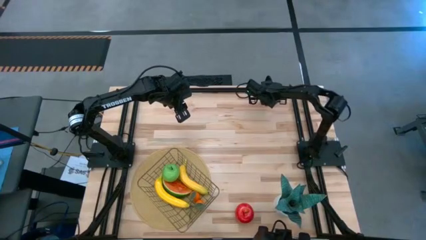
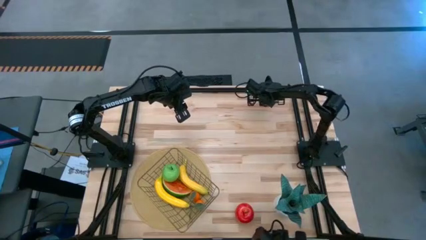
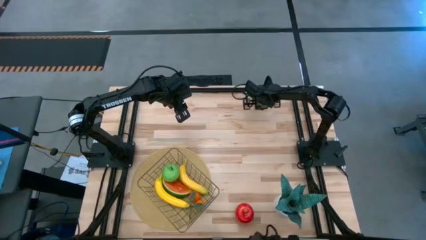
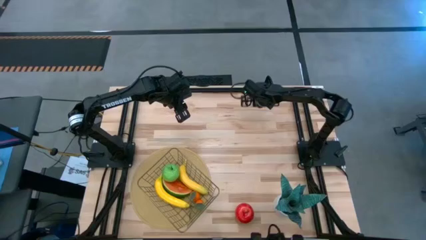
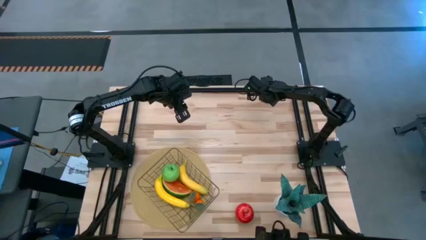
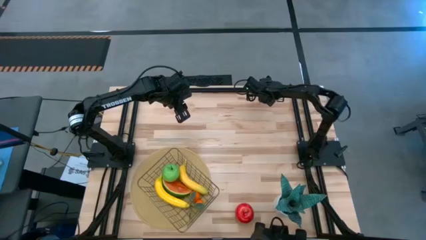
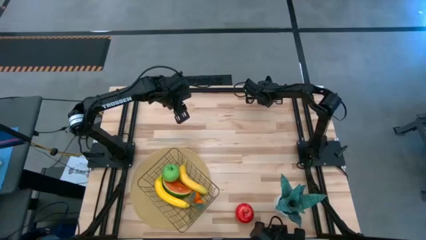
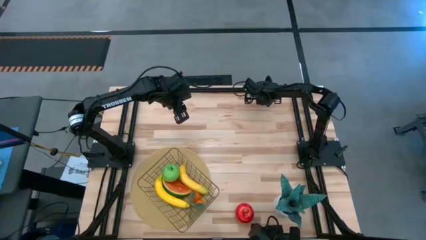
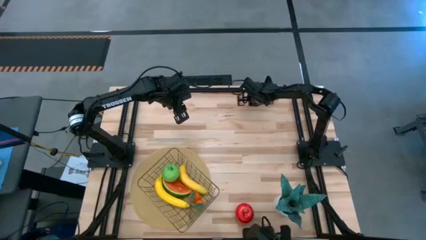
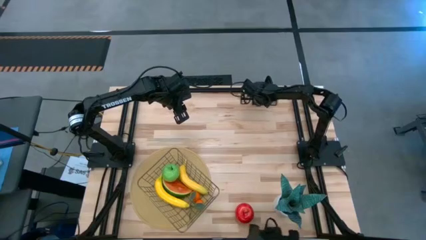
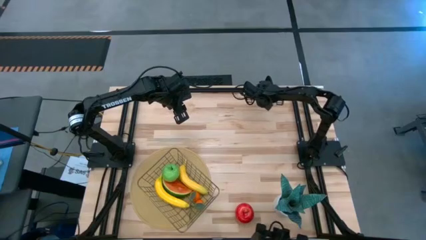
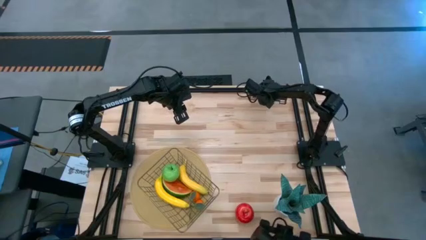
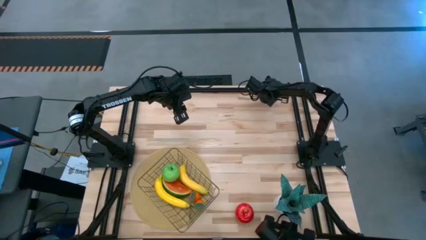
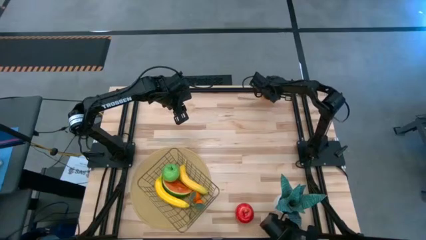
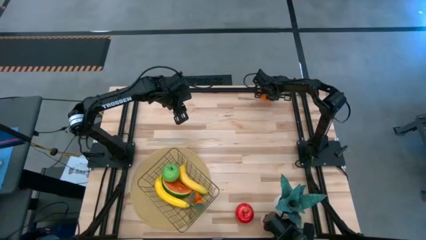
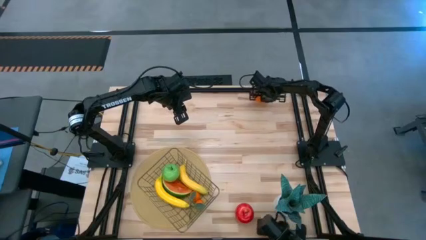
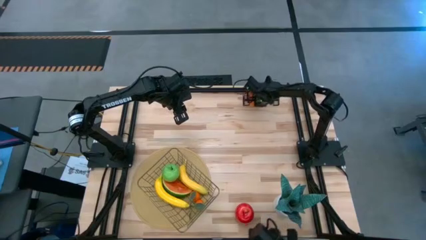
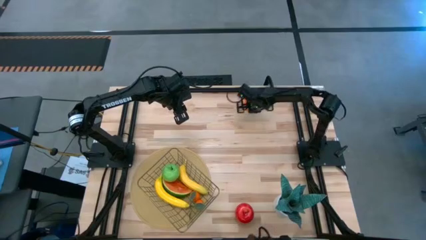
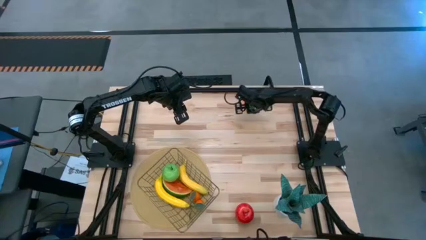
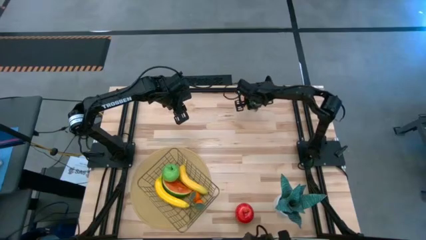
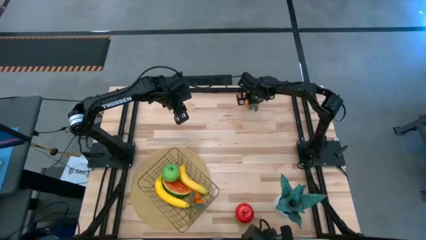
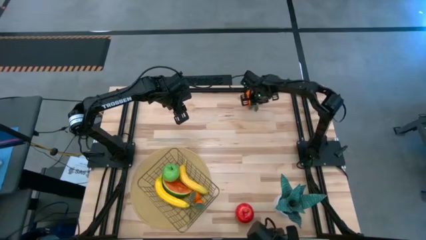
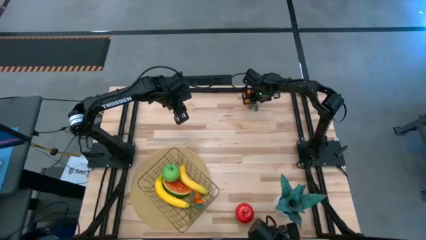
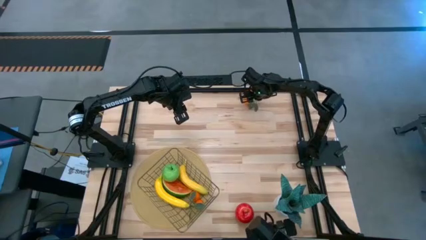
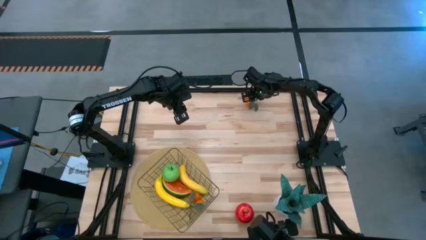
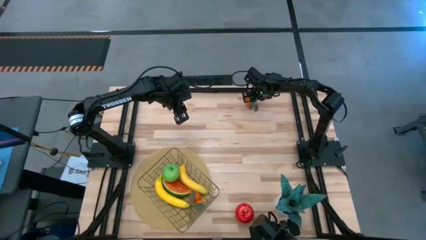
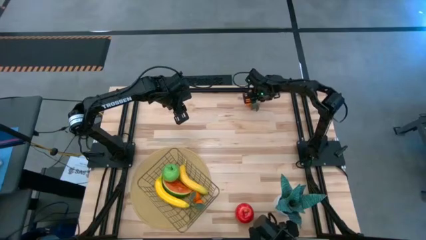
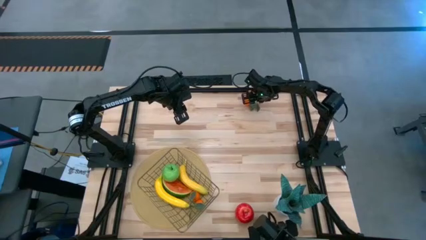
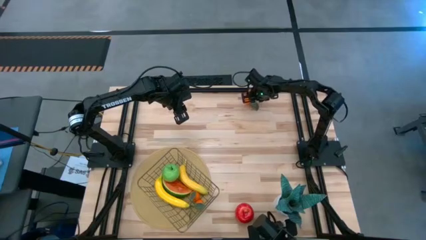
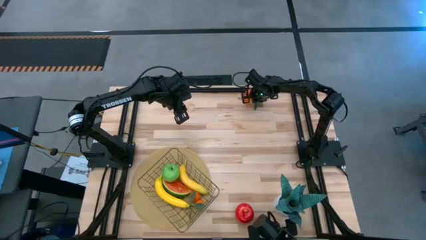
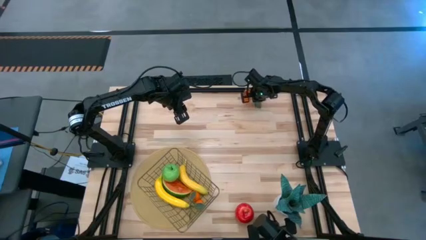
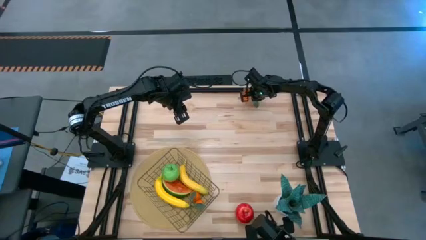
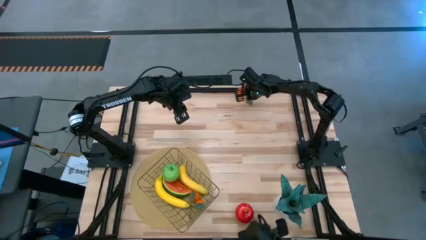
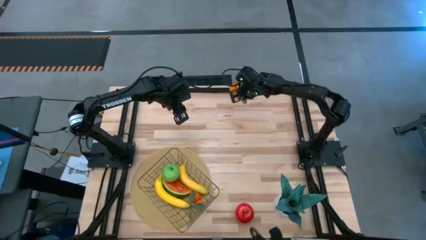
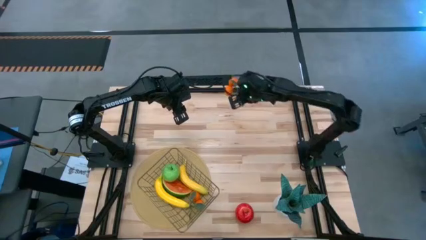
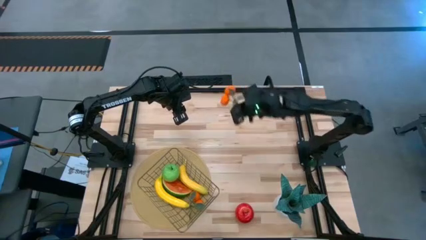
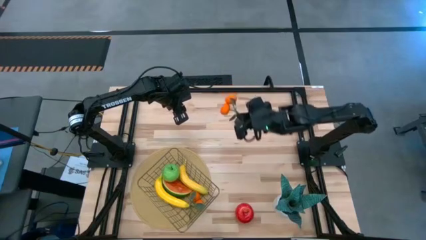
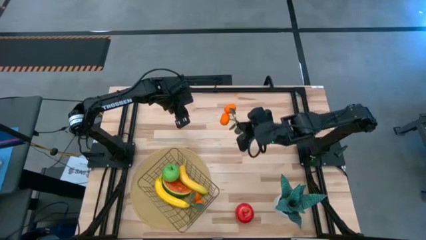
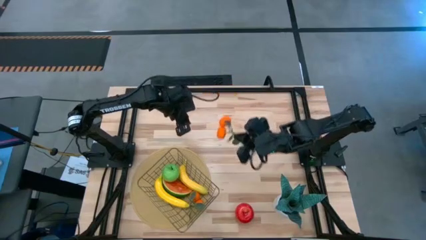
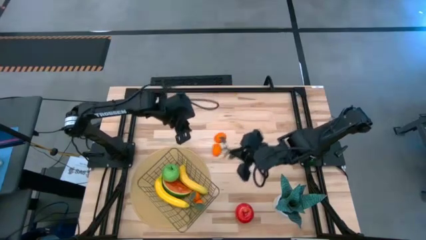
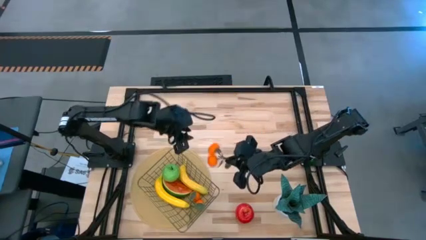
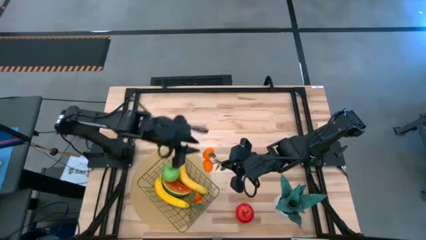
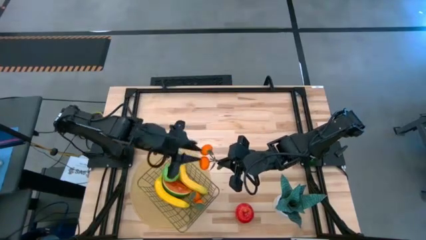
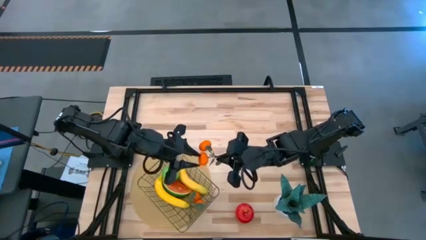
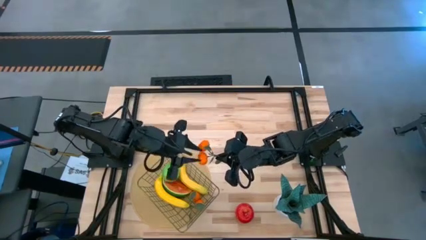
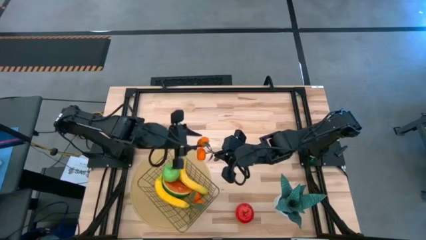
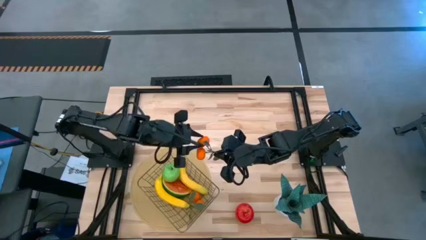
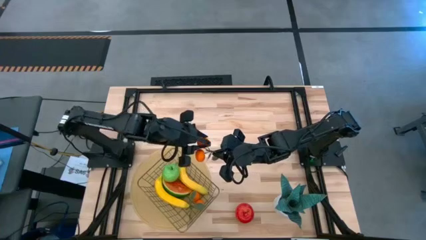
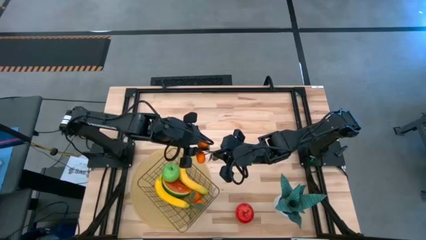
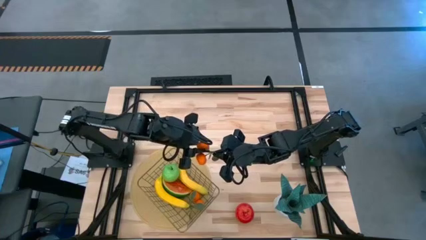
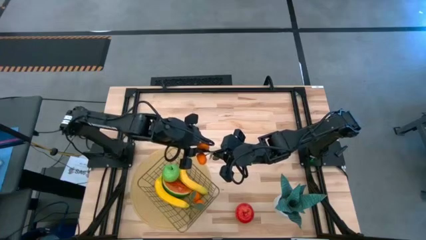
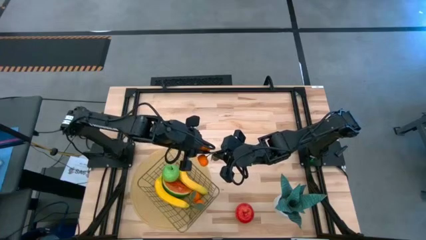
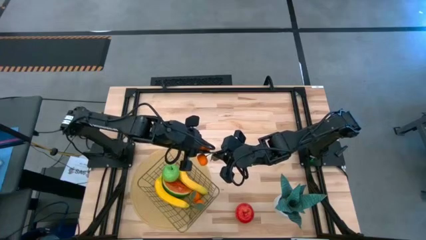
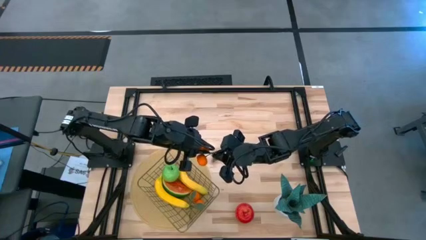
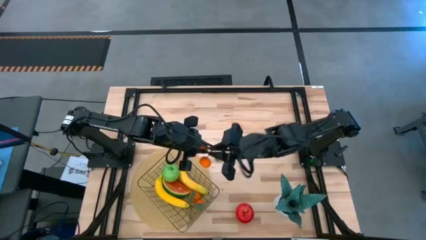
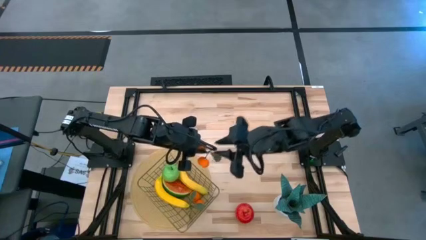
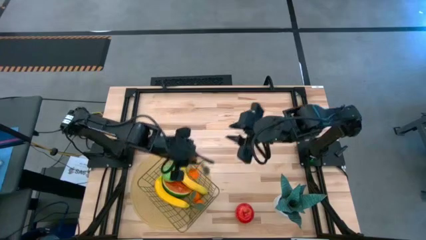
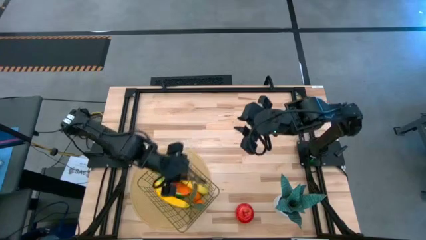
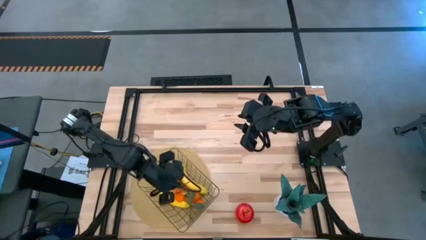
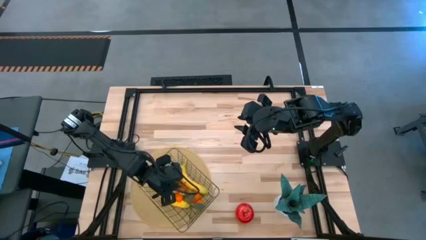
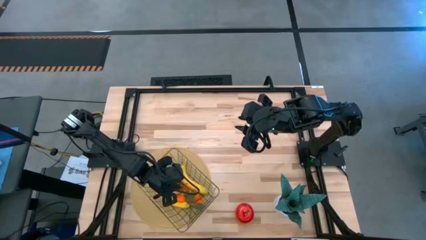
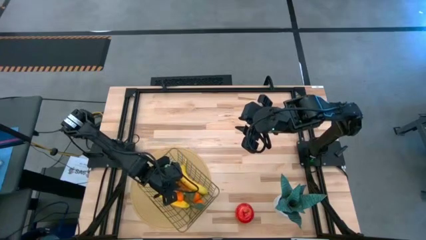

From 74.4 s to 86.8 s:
Task: Build produce basket
Put the oranges into the gold wire basket

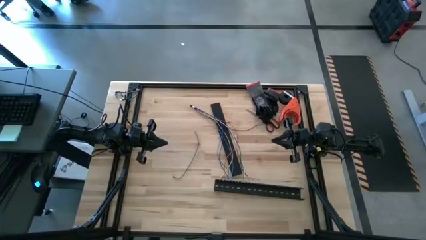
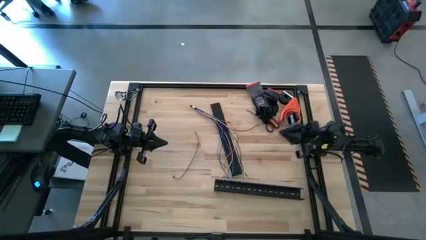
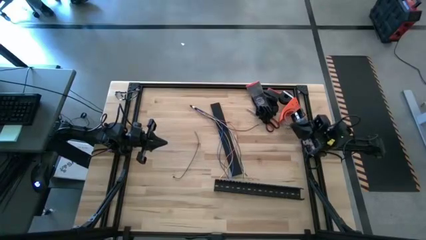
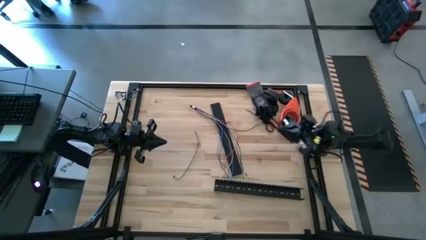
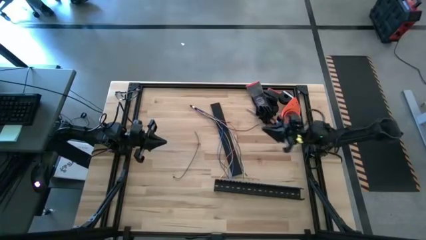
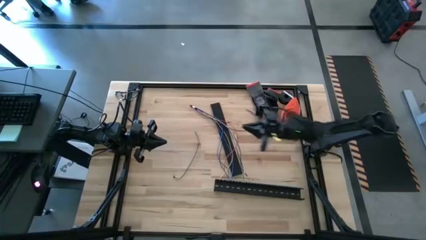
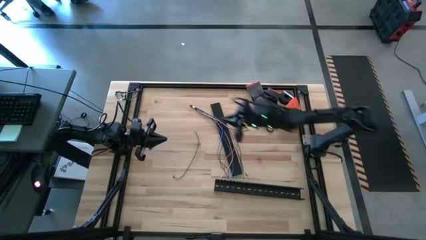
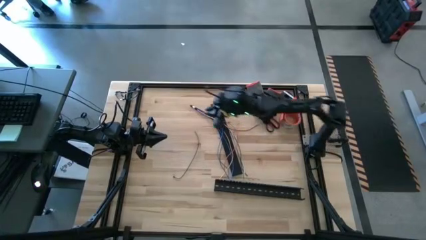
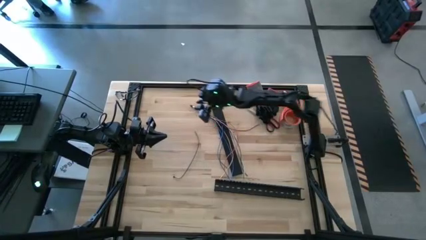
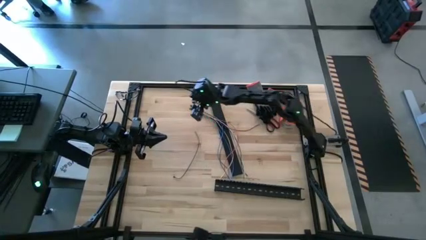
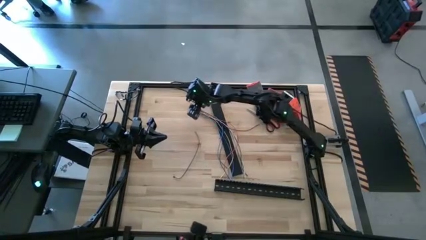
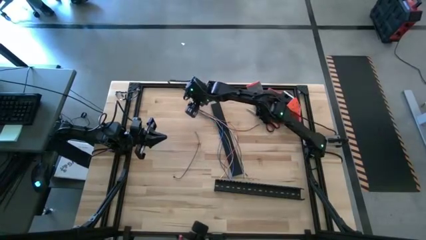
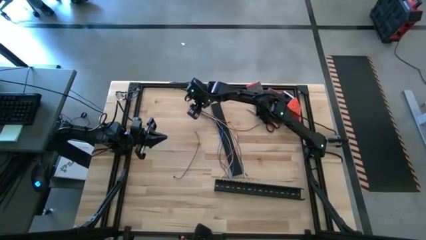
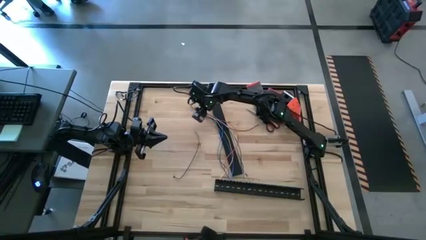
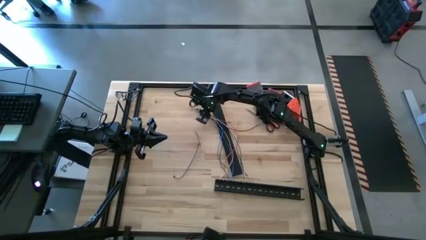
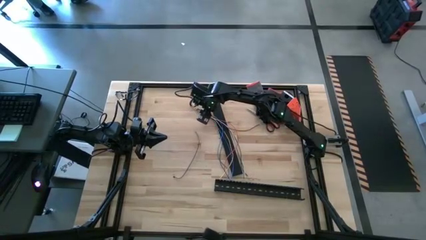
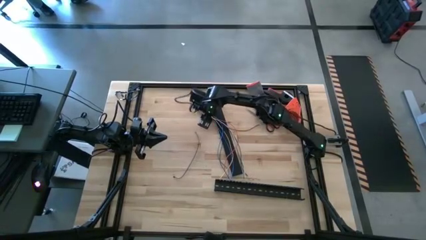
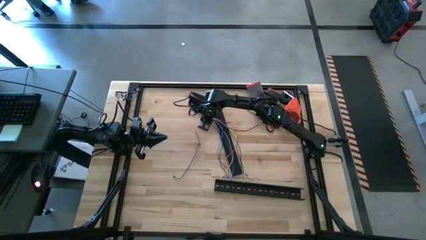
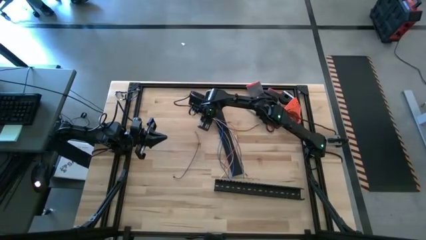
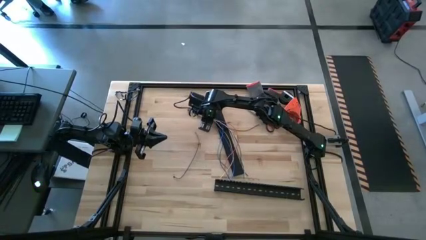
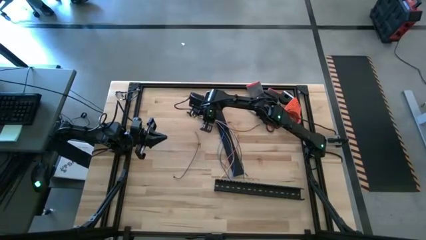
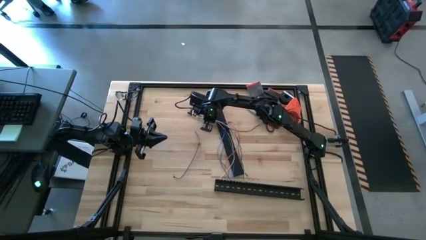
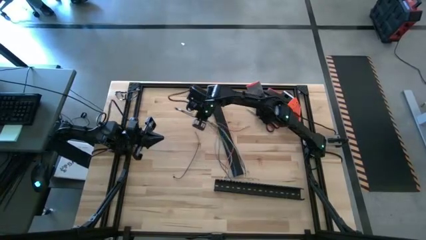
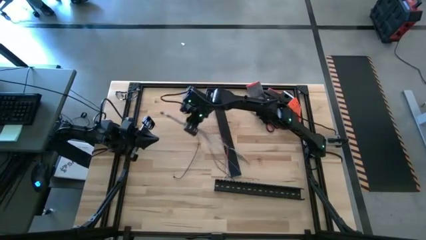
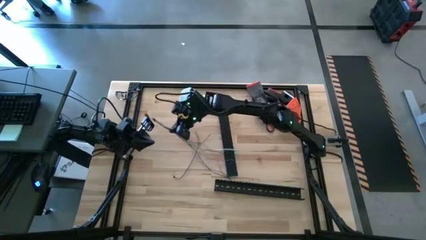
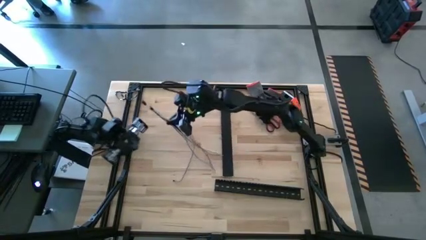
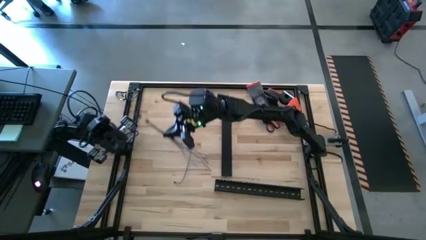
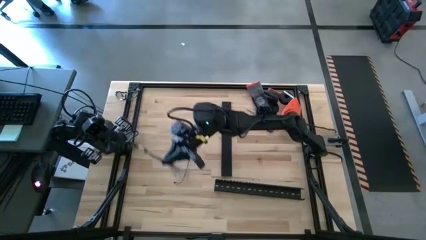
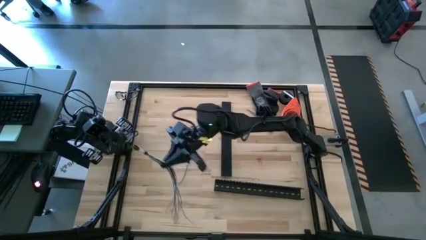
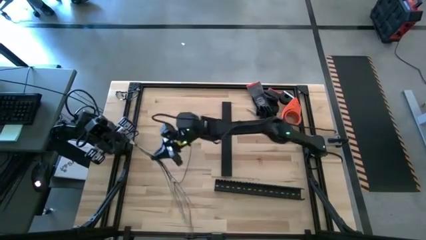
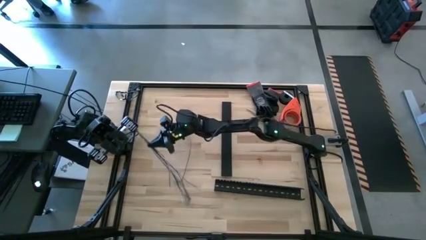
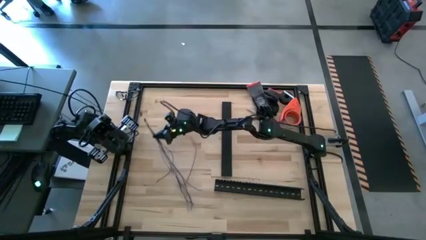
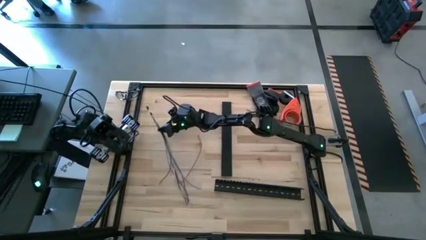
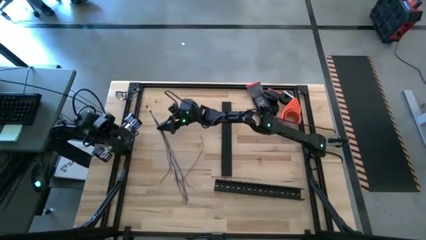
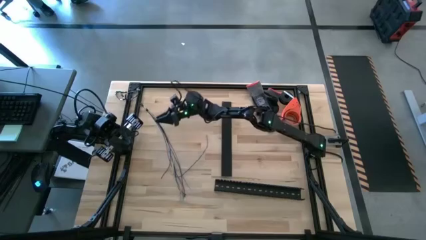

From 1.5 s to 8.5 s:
Task: Ziptie cables
Move the cable wires to the middle left of the table
